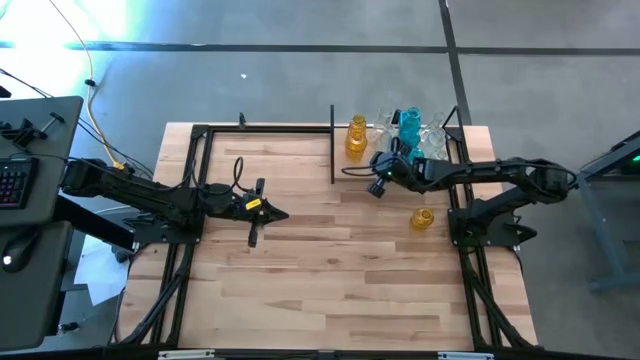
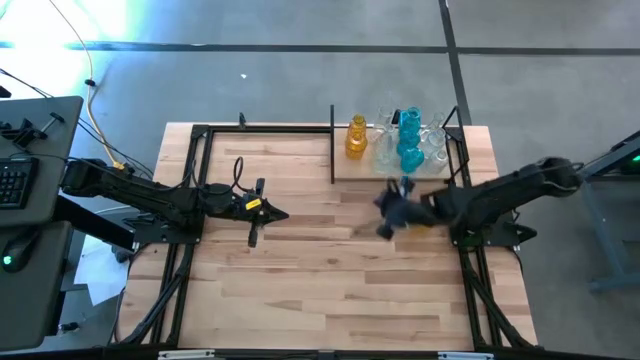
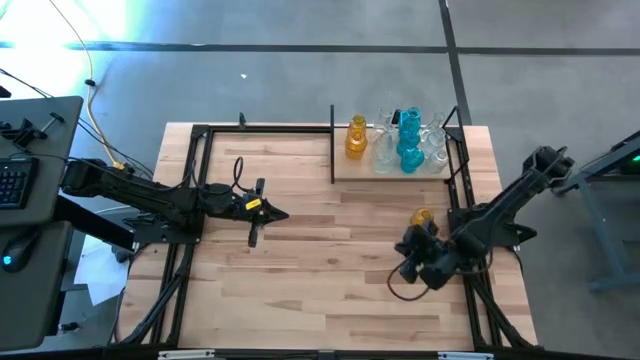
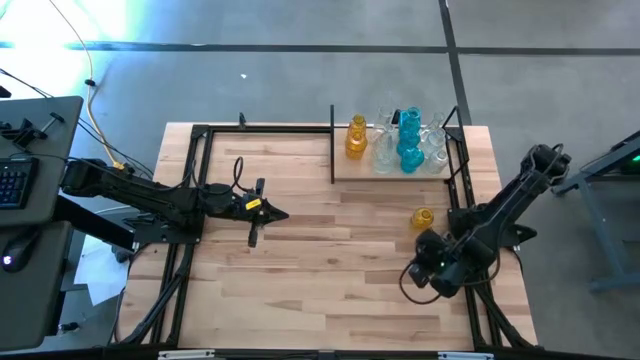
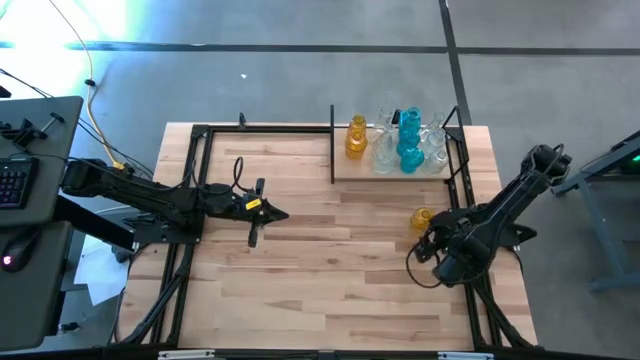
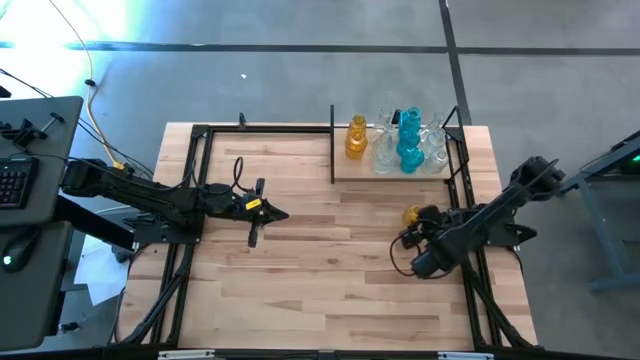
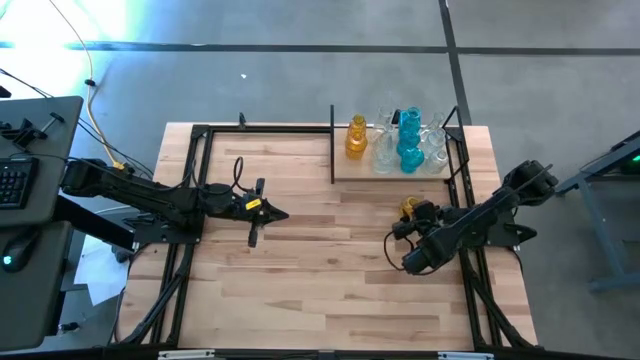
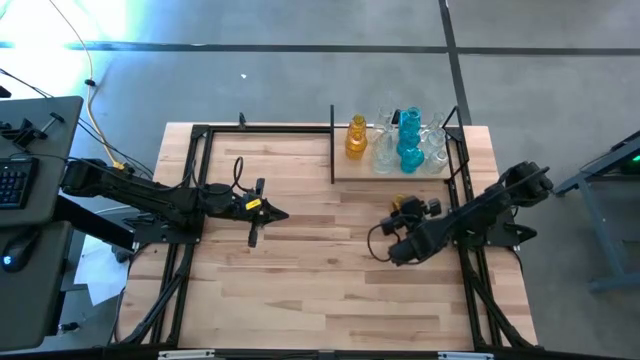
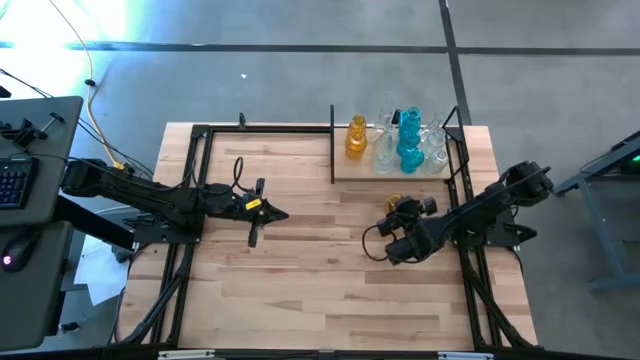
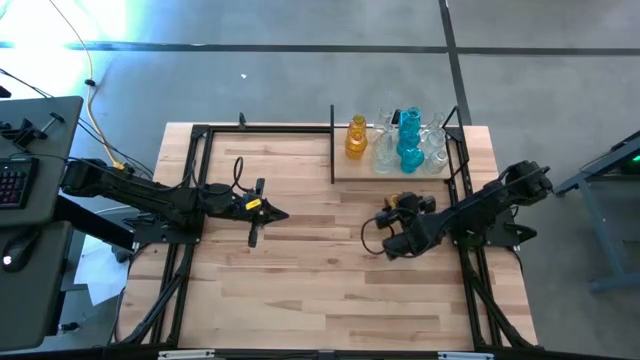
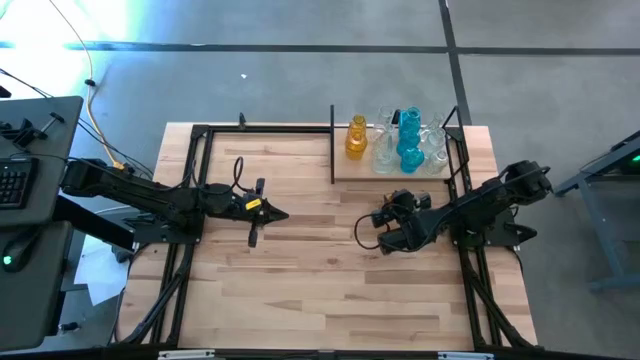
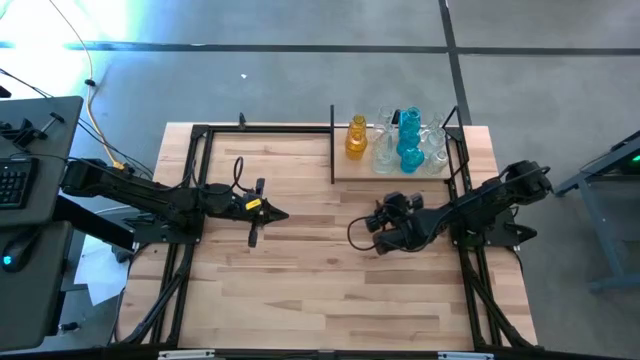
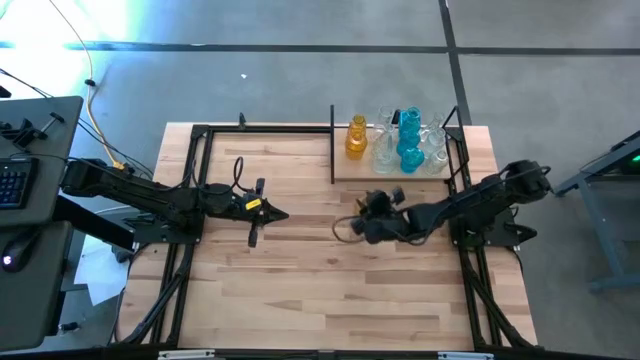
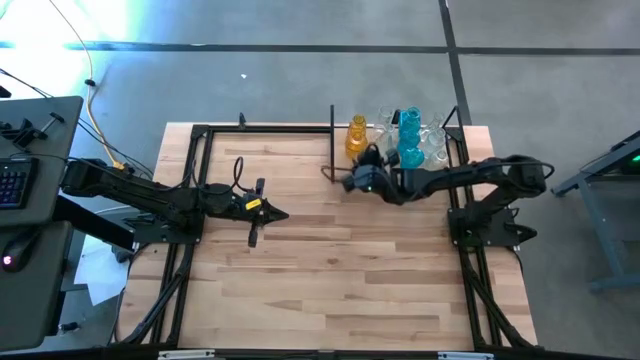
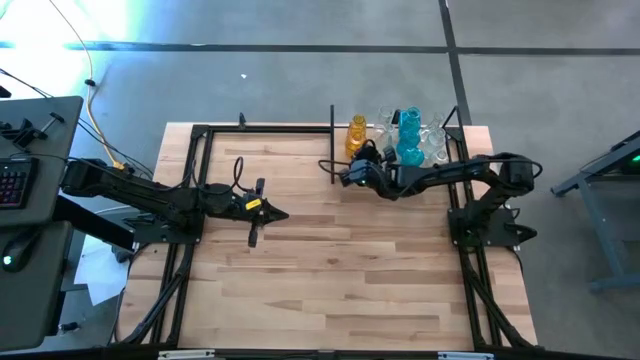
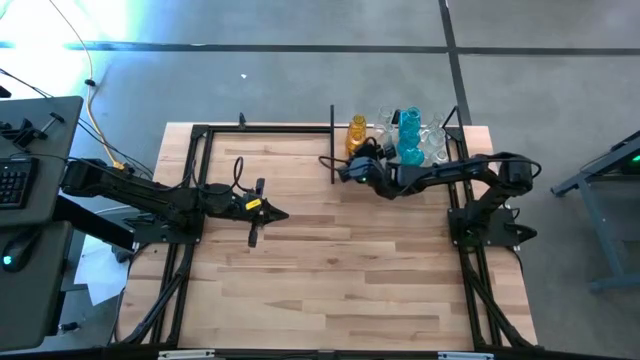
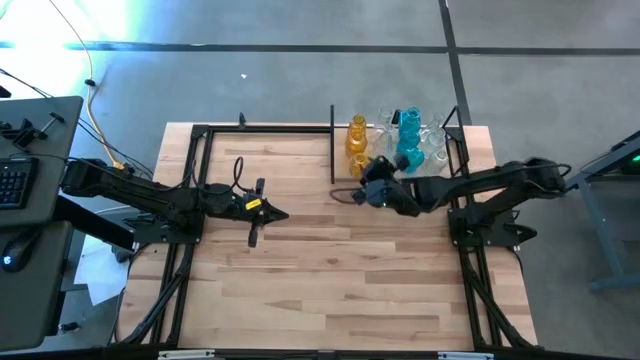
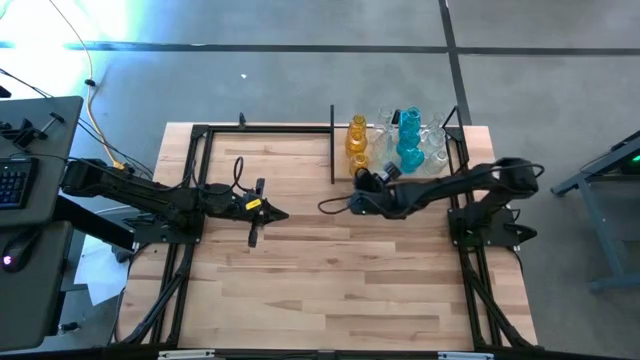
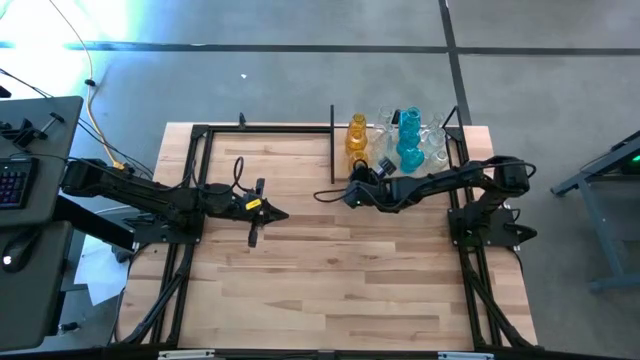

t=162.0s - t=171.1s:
Task: sort vases onto shelf
Put the yellow vase on the shelf aligned with the other yellow vase

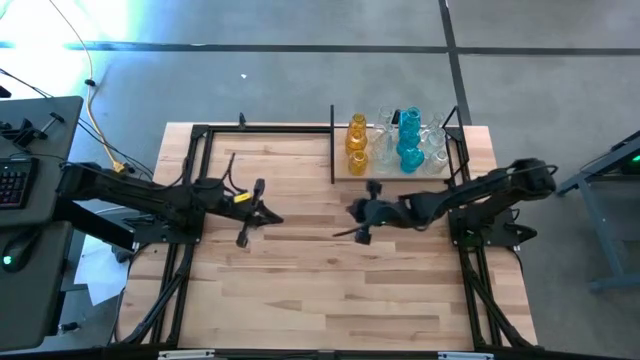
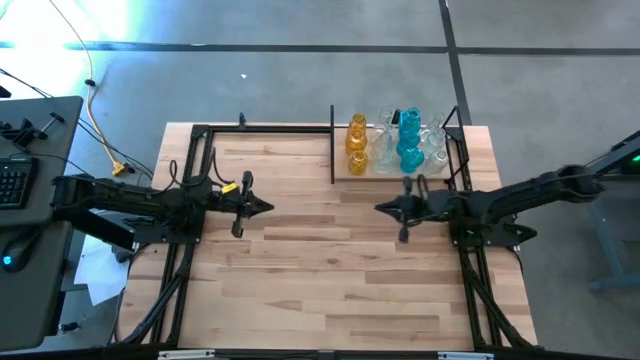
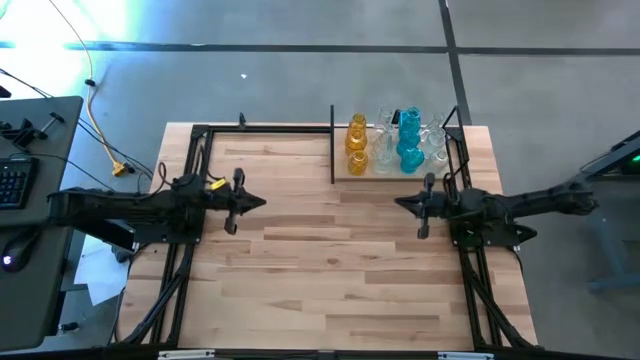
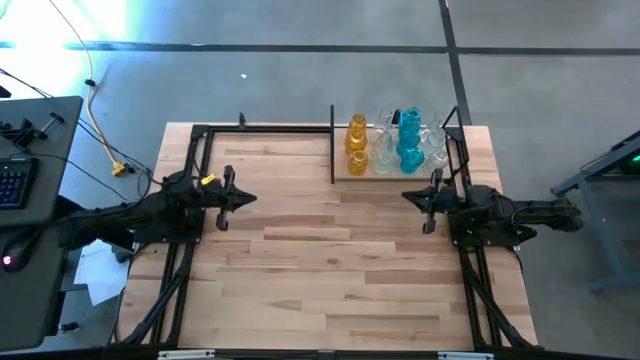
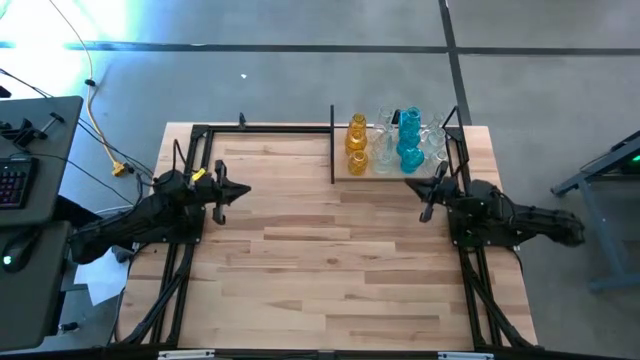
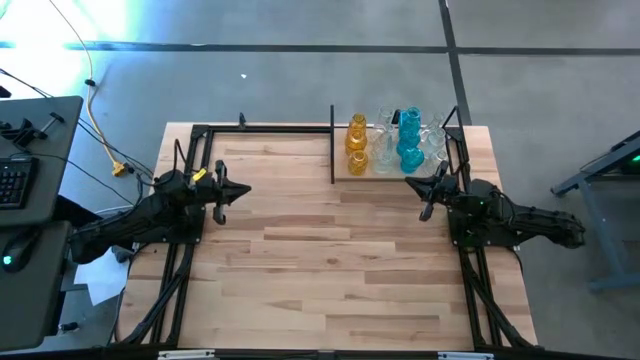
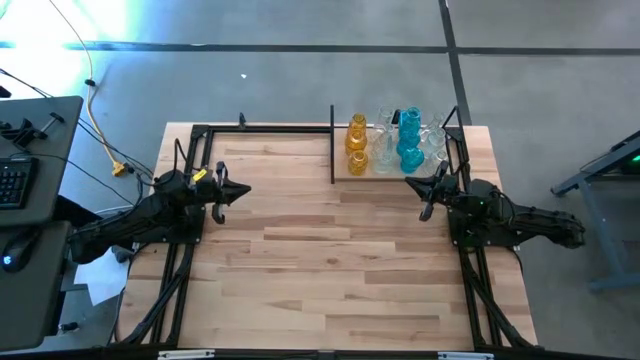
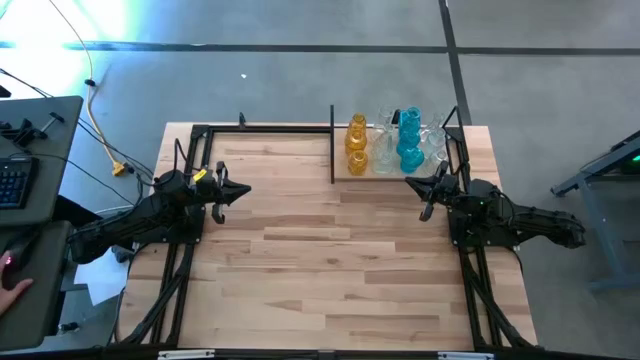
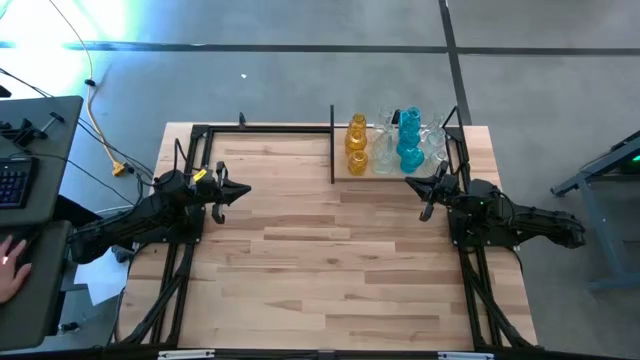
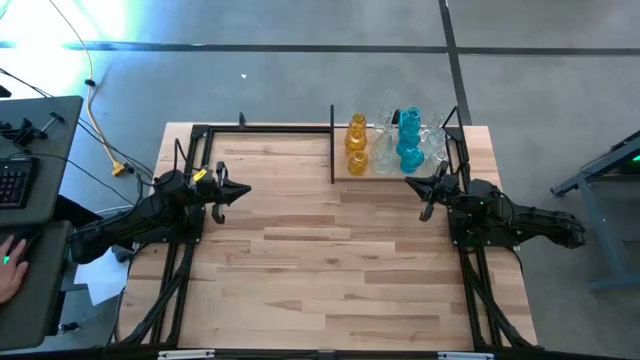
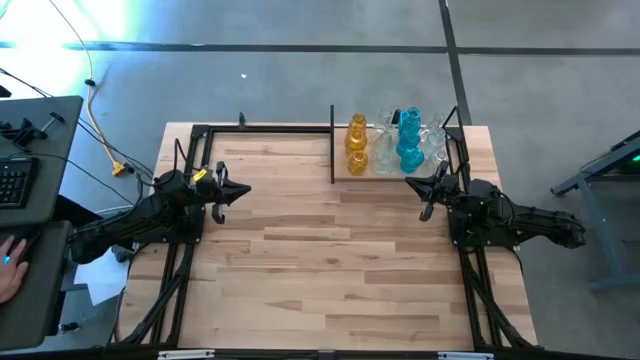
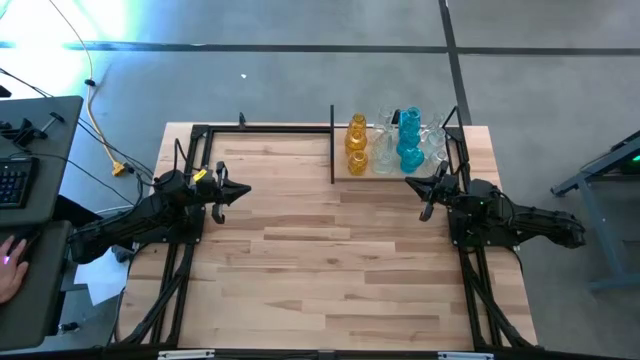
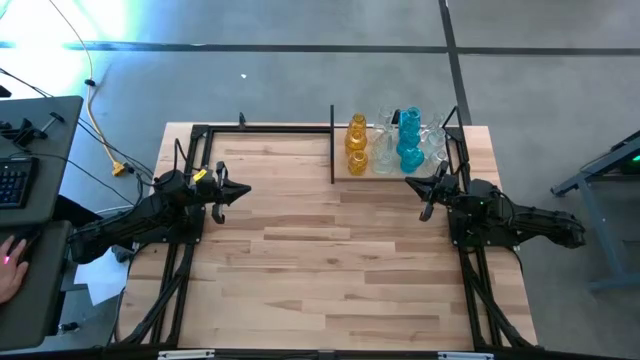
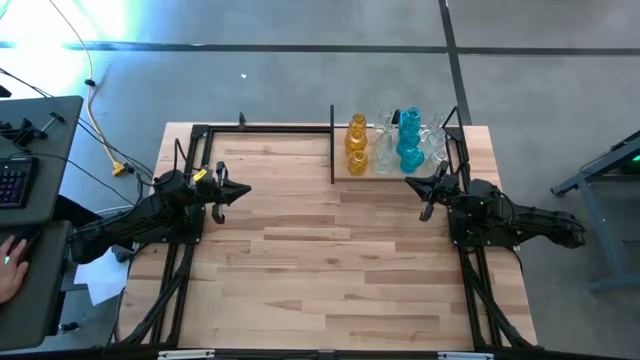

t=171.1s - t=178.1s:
Return to Home Position
